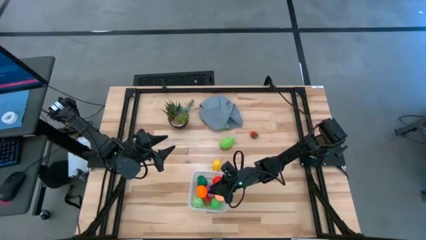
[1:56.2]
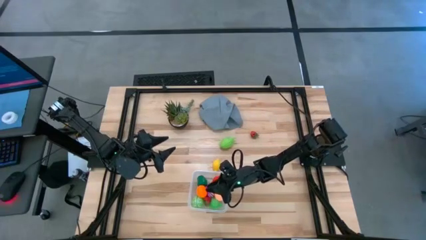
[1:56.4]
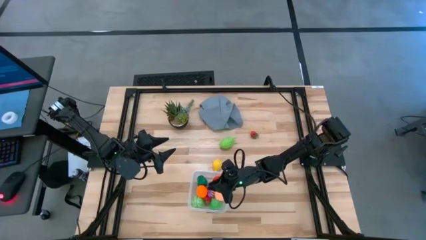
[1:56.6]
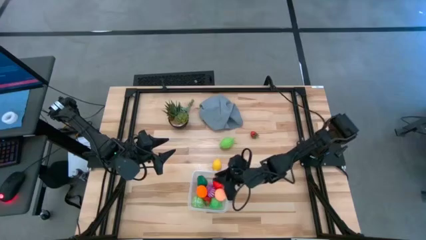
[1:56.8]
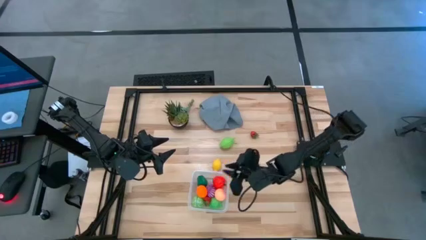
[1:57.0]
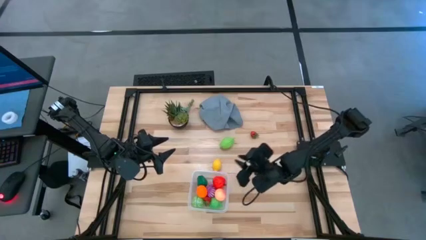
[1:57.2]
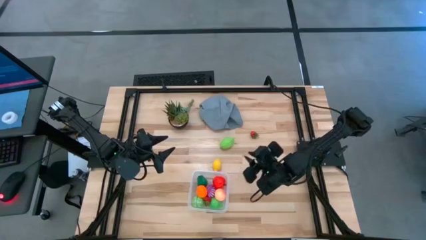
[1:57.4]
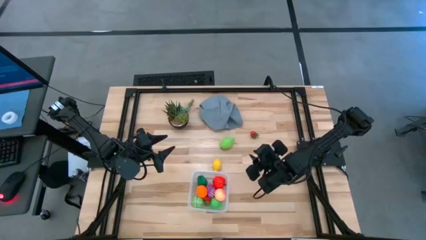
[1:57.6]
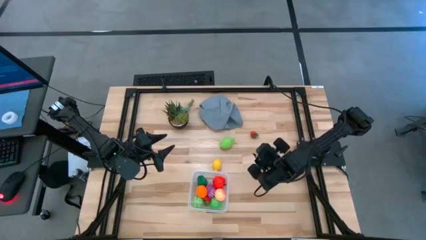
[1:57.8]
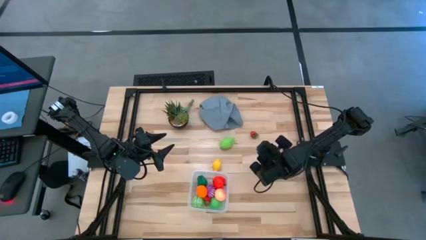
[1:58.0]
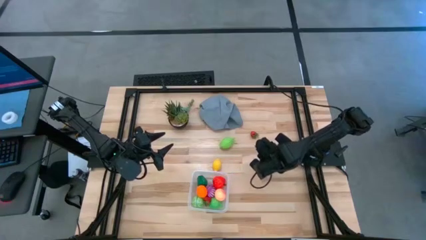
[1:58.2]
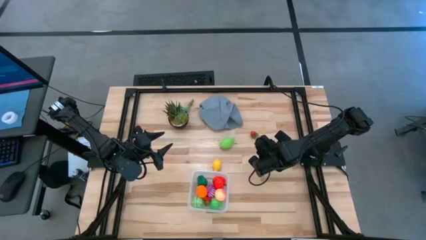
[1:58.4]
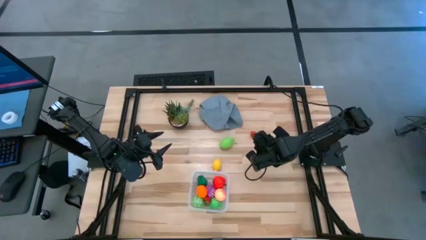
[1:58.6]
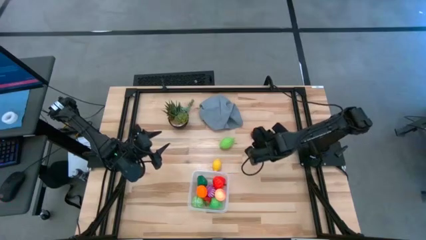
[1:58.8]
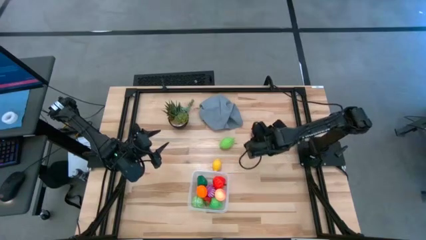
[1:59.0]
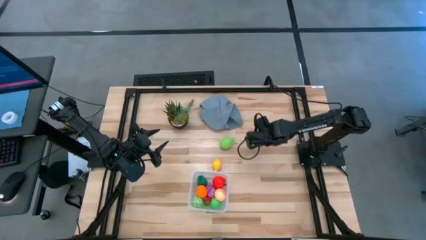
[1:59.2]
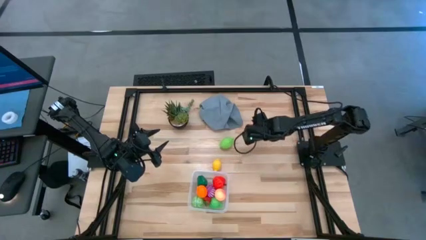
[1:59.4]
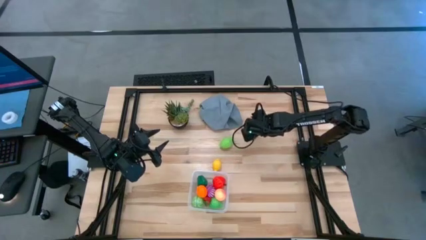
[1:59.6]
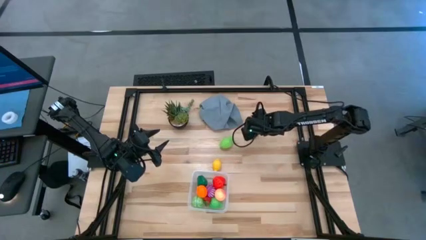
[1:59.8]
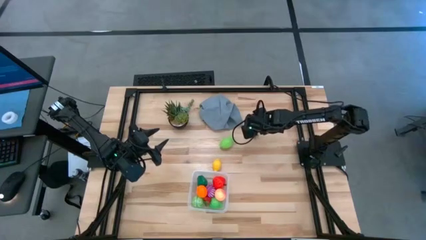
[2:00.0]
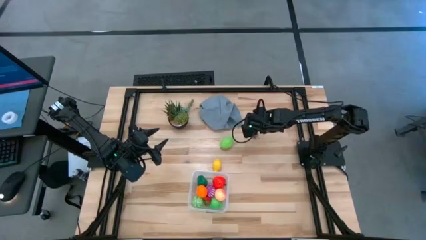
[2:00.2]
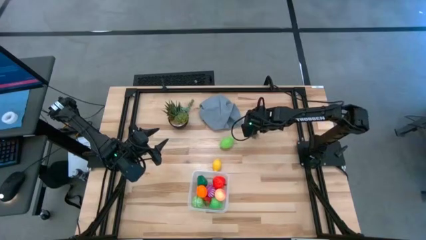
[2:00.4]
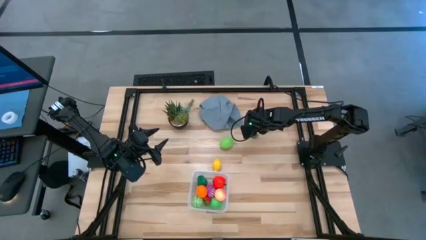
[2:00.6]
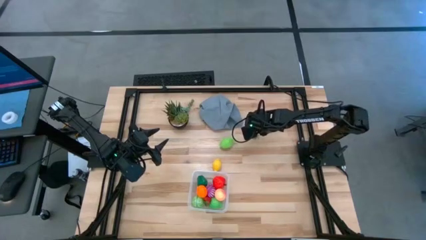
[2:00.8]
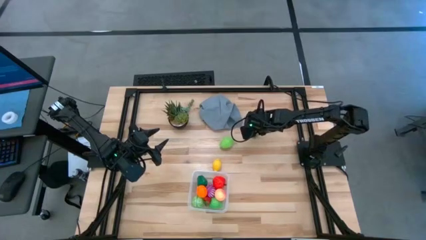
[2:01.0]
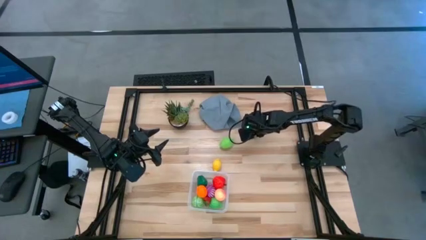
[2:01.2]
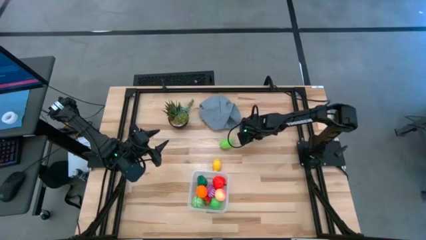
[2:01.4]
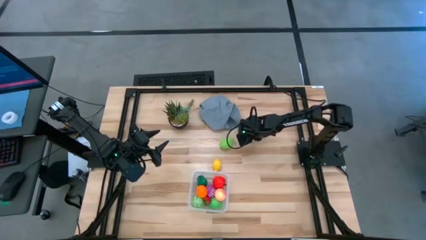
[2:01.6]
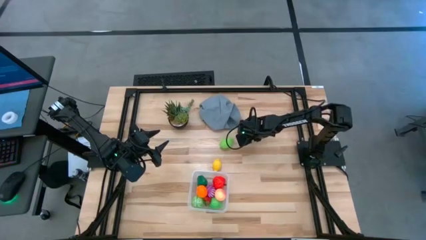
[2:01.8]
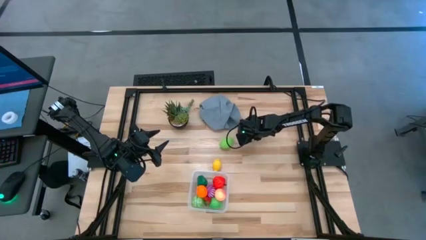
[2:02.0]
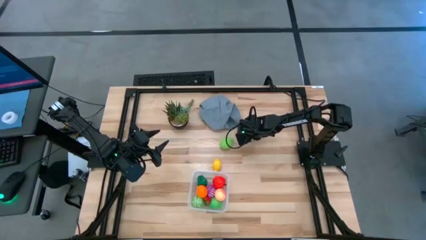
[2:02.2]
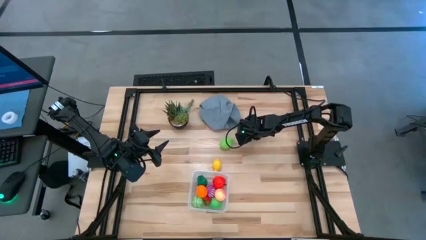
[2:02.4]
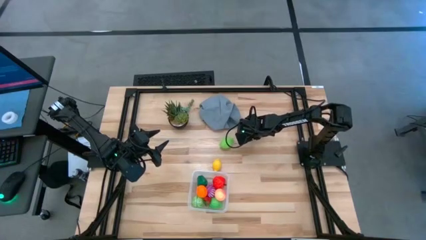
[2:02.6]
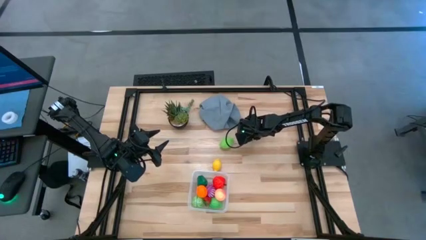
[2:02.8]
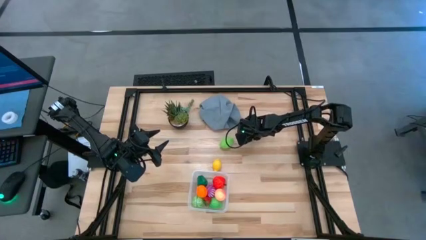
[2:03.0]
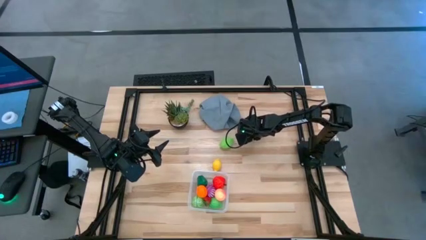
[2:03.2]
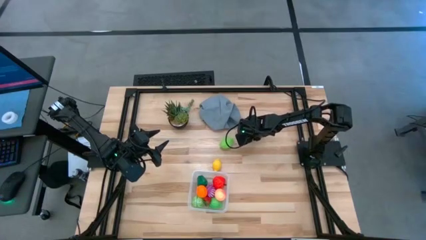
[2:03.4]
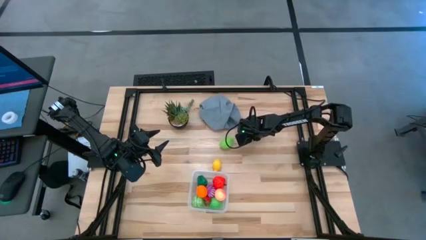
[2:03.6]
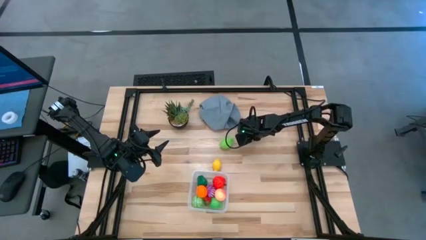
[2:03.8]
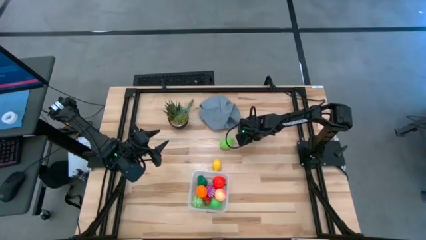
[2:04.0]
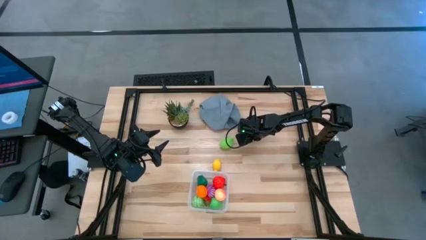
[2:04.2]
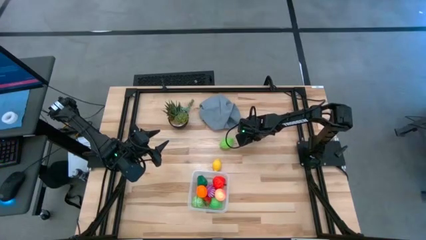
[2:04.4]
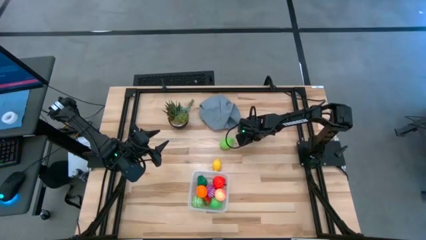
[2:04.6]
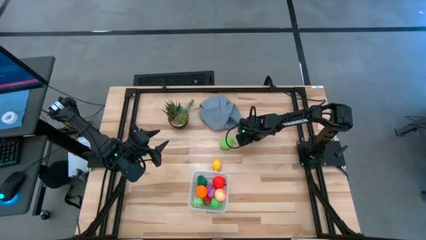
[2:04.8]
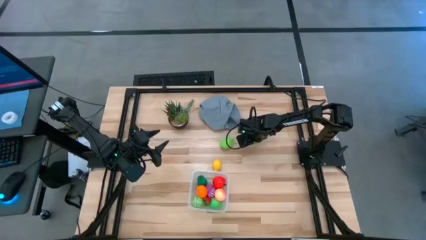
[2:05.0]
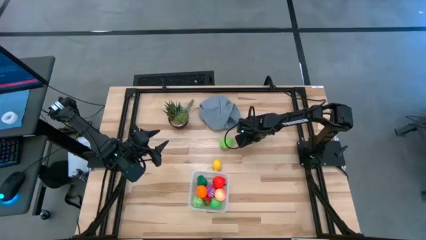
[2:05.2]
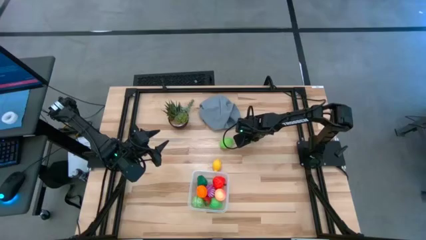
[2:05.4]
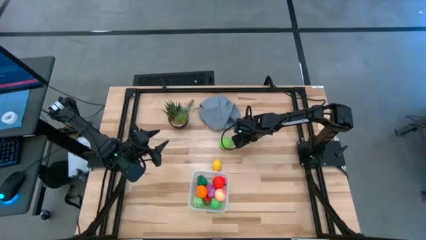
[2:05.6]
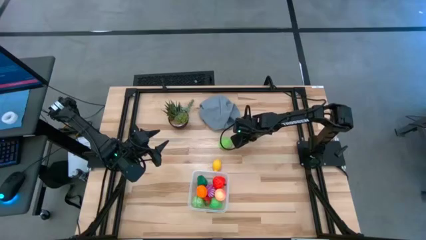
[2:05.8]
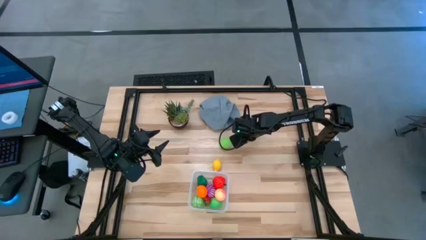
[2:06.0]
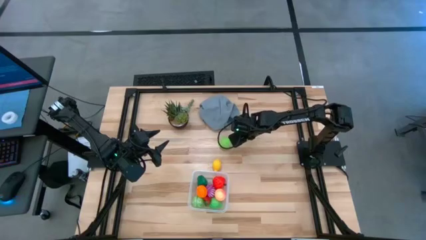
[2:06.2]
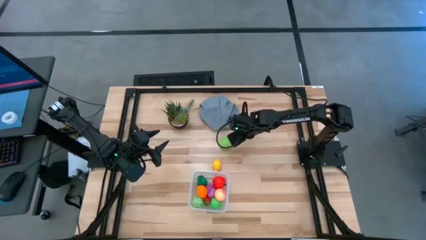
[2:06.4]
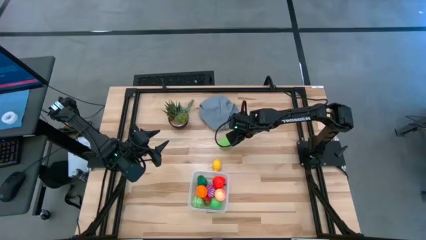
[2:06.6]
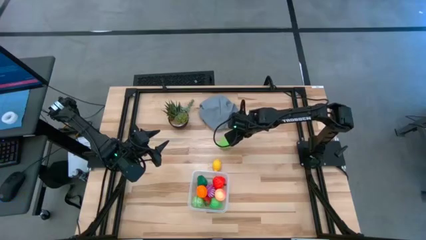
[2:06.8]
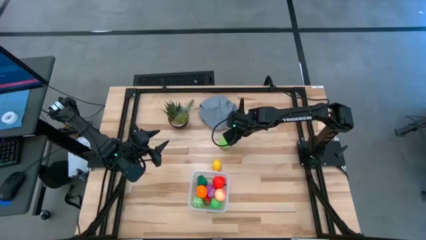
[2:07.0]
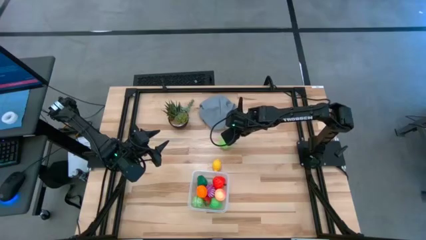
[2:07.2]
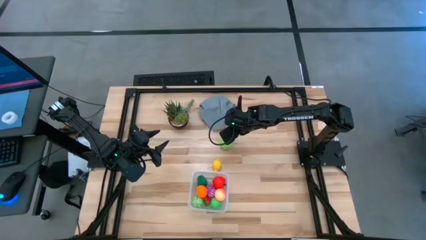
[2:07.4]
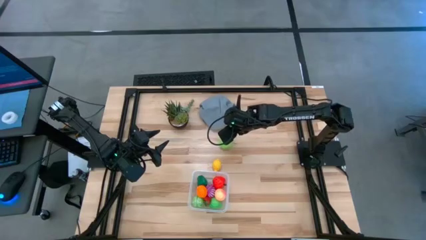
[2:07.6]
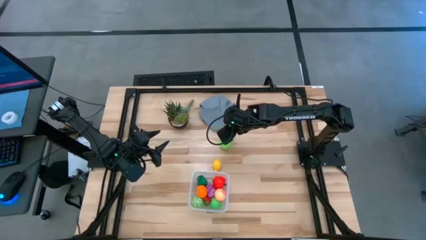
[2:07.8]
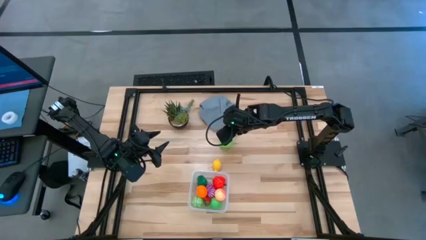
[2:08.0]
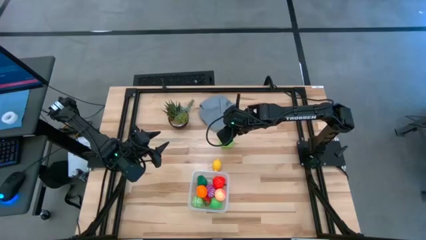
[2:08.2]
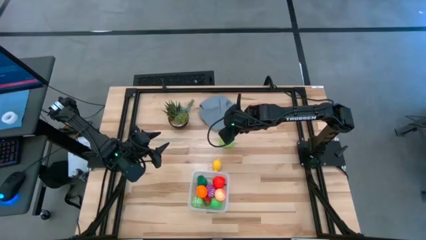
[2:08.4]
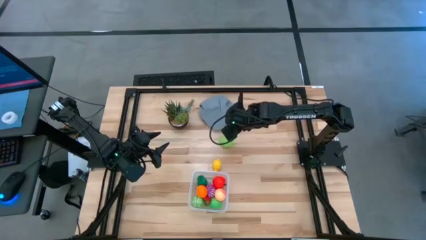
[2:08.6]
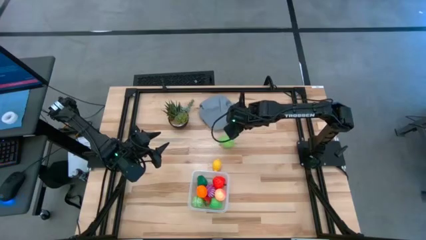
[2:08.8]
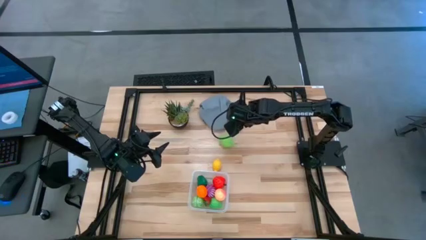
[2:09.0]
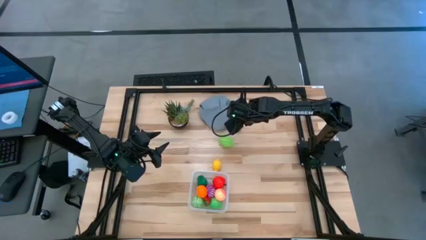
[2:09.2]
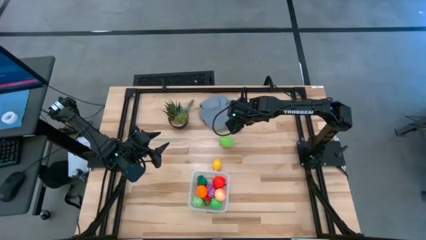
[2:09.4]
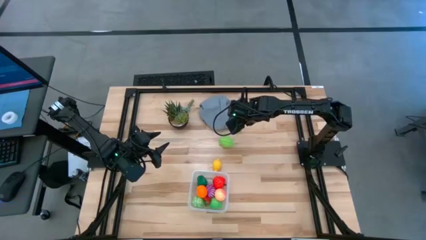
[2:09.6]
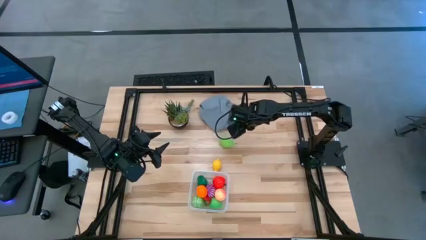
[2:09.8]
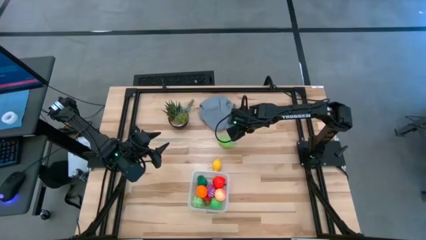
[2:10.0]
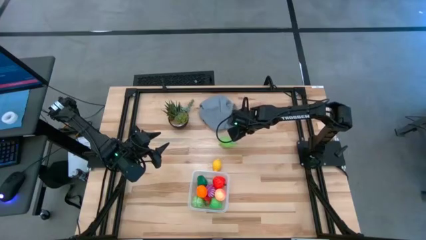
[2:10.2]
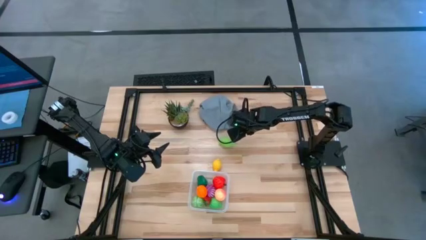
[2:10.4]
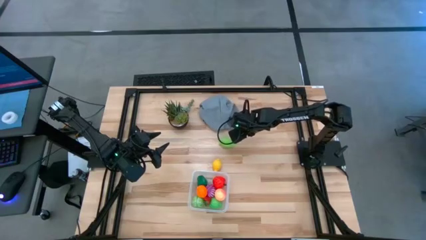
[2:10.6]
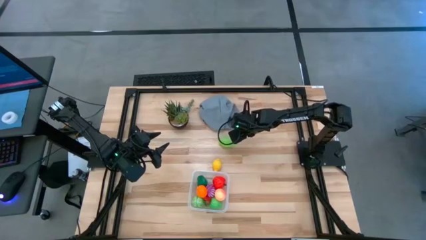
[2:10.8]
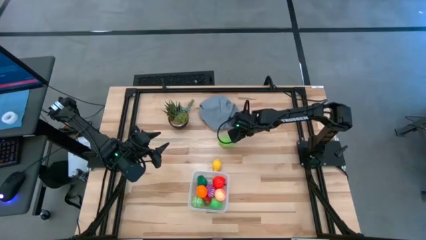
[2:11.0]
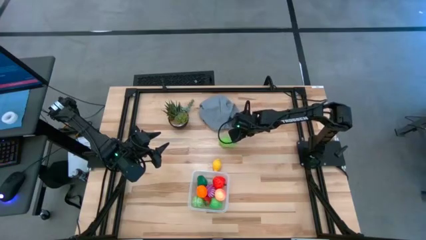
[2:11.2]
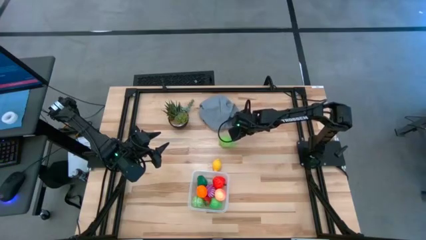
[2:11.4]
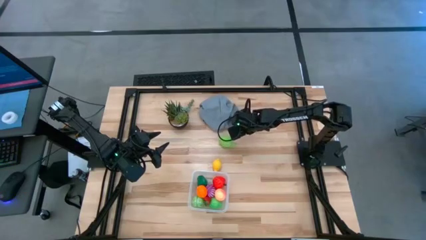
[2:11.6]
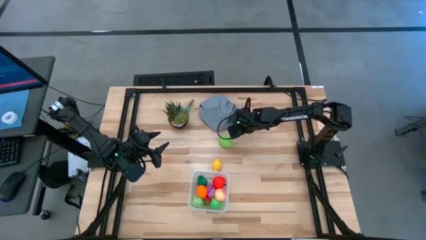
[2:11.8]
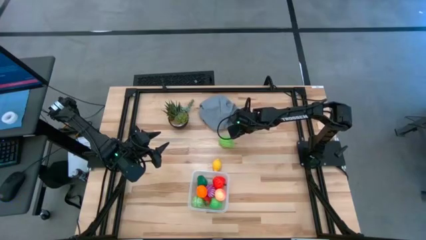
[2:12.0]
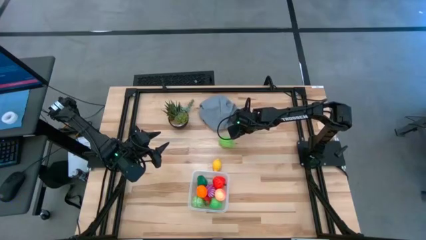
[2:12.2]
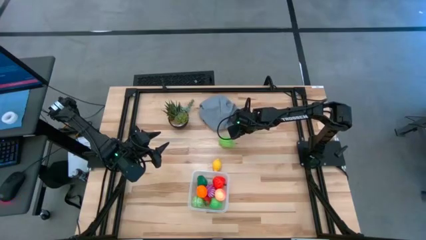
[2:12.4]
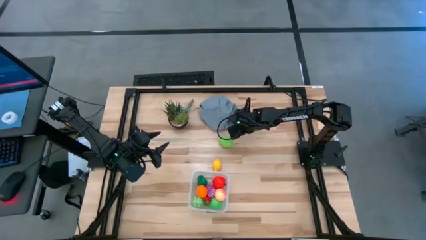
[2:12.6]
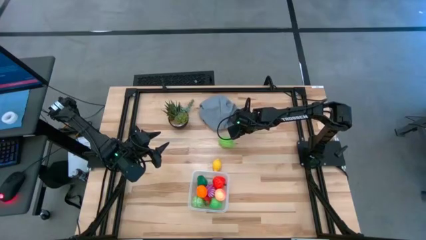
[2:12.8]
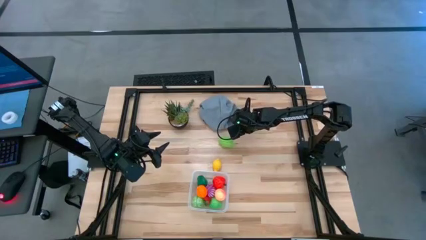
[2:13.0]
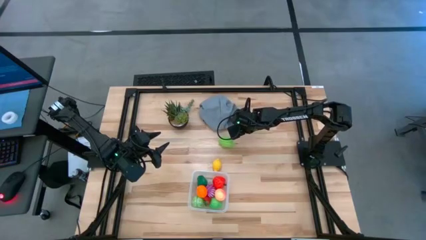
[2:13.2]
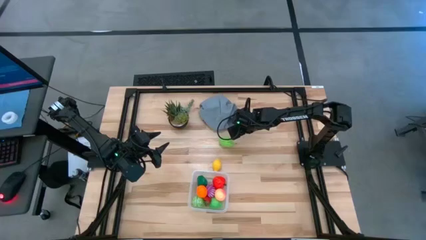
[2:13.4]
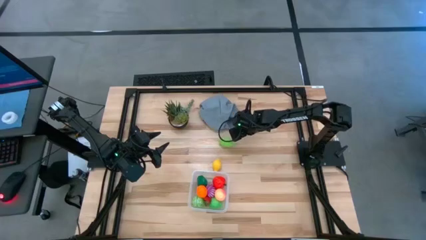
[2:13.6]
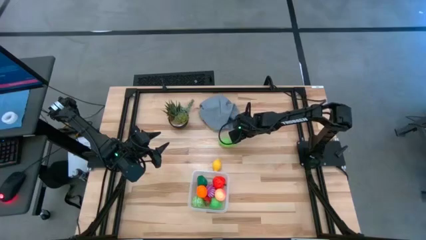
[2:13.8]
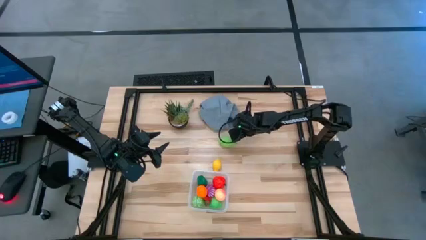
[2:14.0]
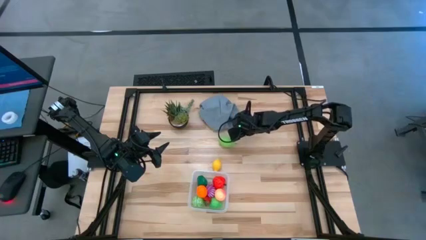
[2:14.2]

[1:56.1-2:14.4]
Task: Pick and placing Produce into tupperware
Put the red strawberry into the transparent bin
